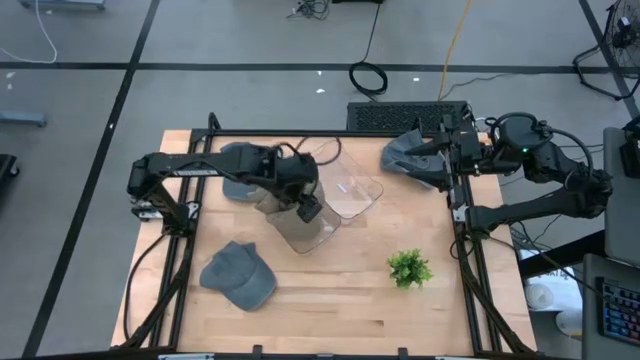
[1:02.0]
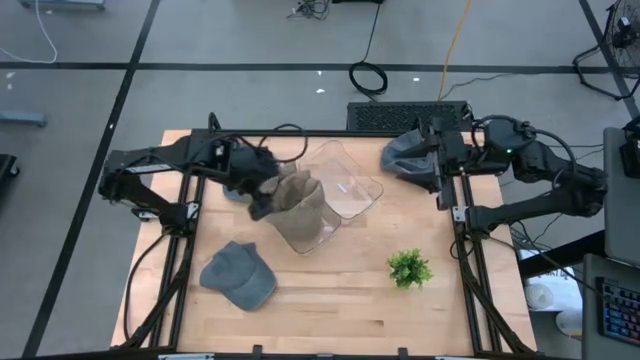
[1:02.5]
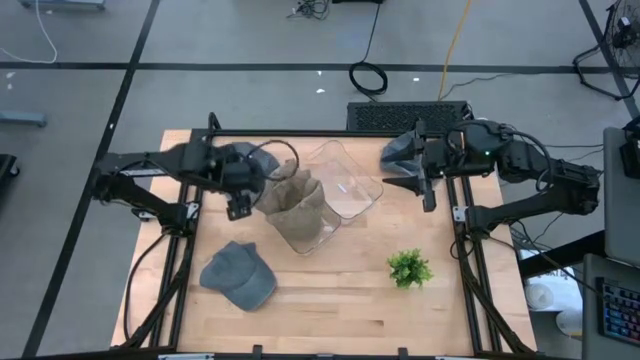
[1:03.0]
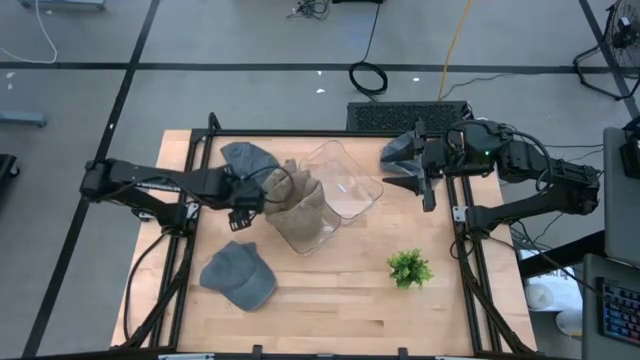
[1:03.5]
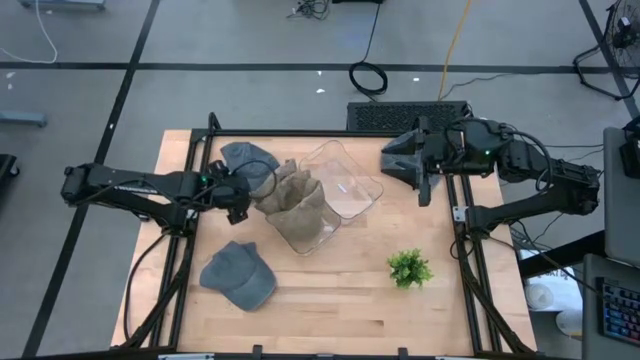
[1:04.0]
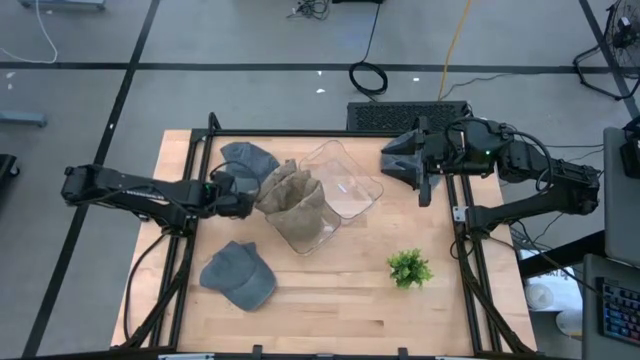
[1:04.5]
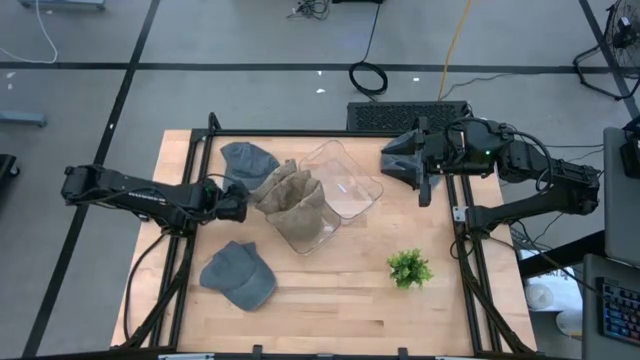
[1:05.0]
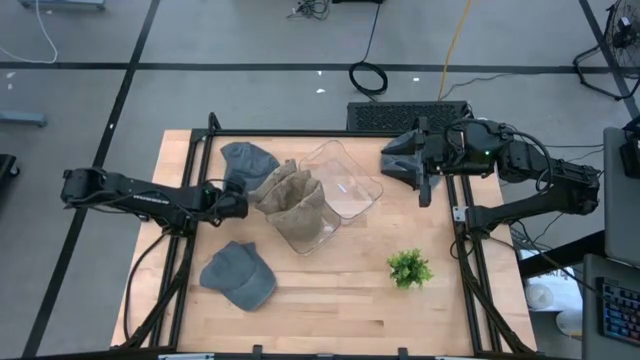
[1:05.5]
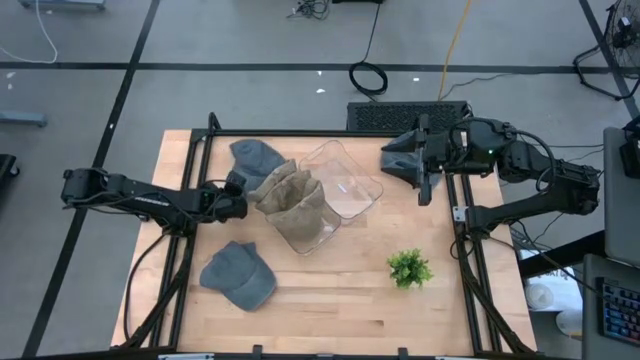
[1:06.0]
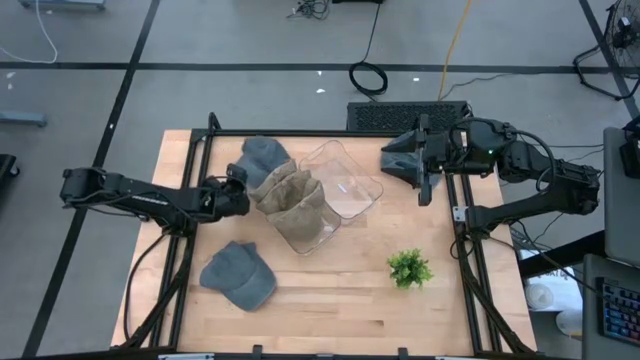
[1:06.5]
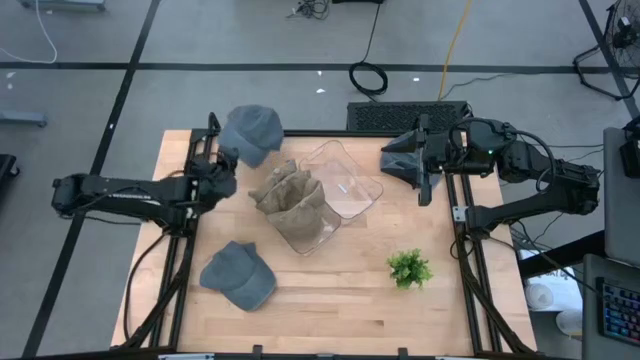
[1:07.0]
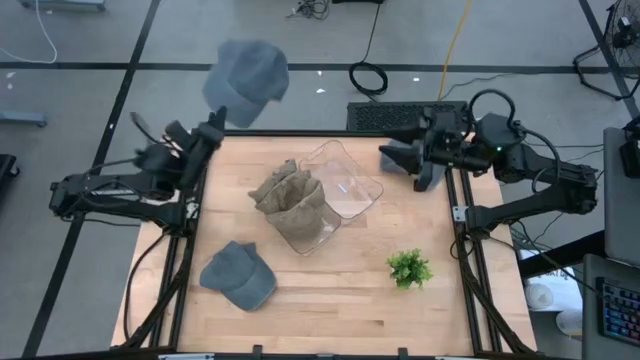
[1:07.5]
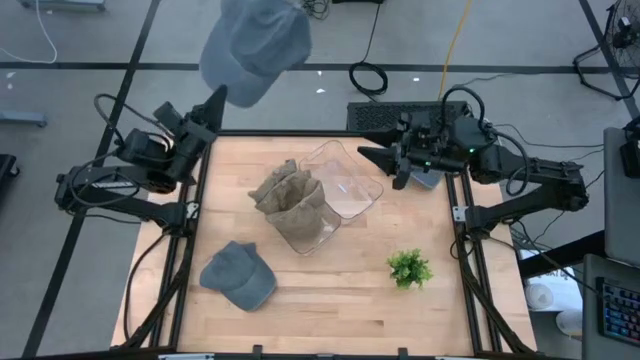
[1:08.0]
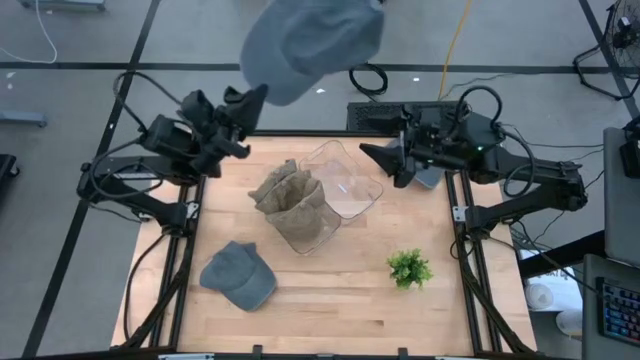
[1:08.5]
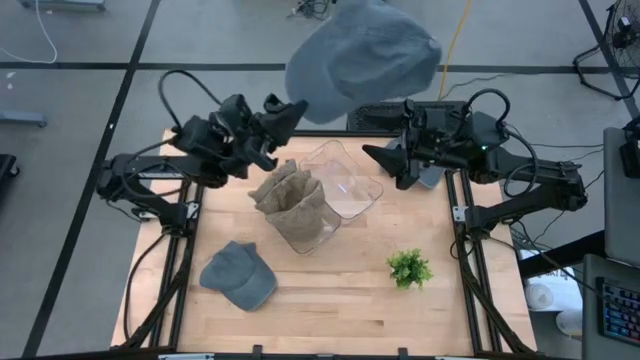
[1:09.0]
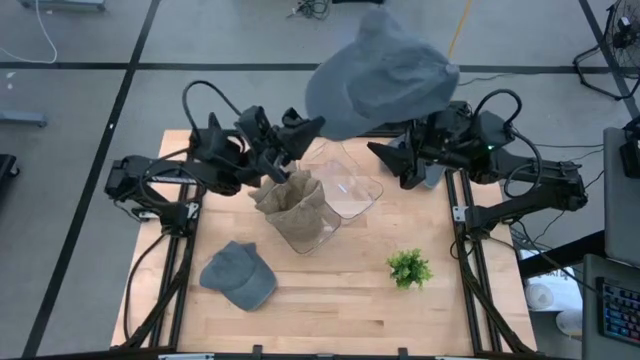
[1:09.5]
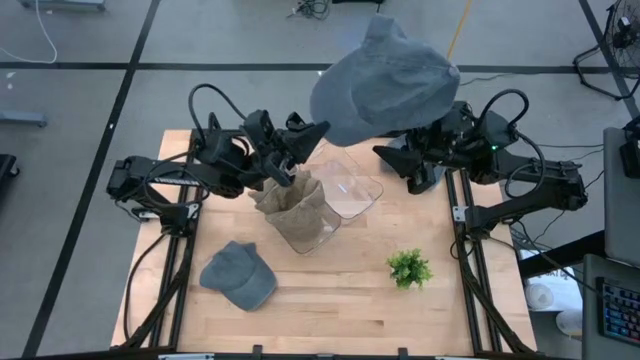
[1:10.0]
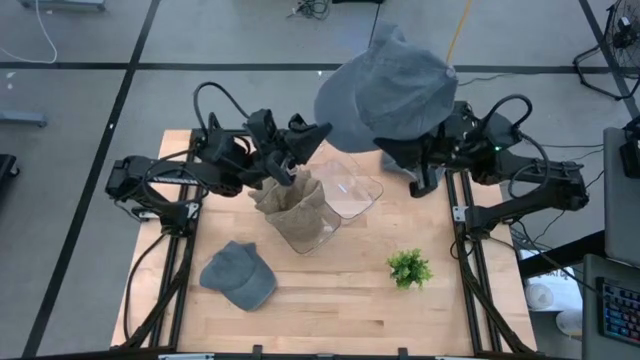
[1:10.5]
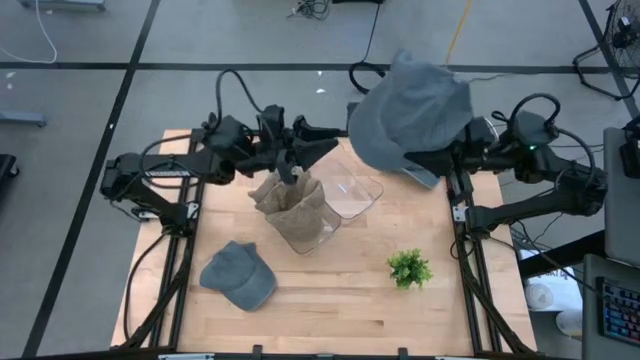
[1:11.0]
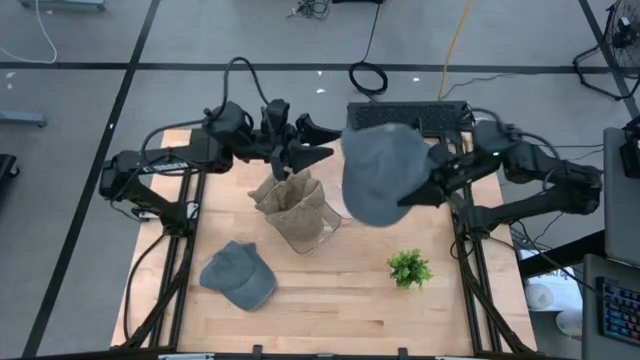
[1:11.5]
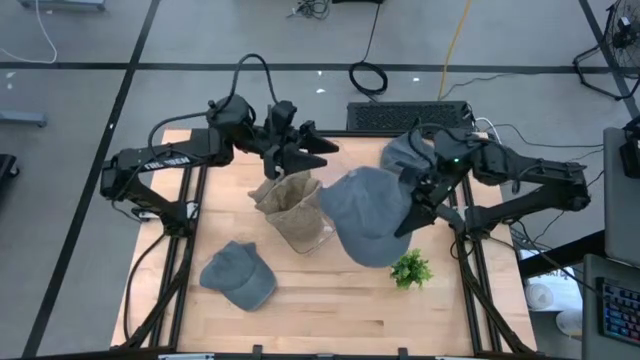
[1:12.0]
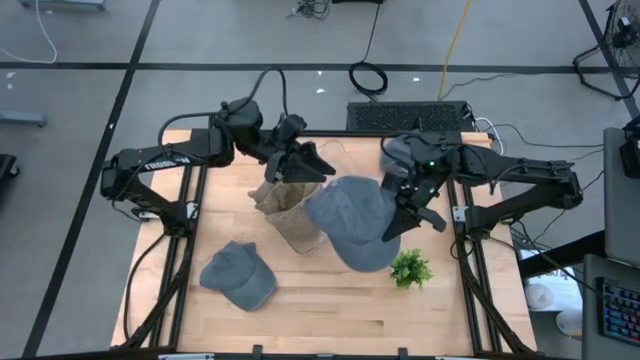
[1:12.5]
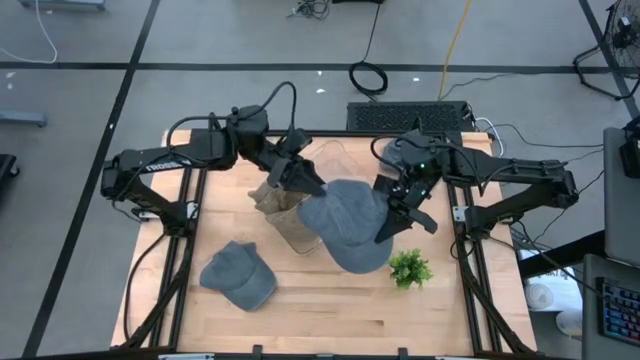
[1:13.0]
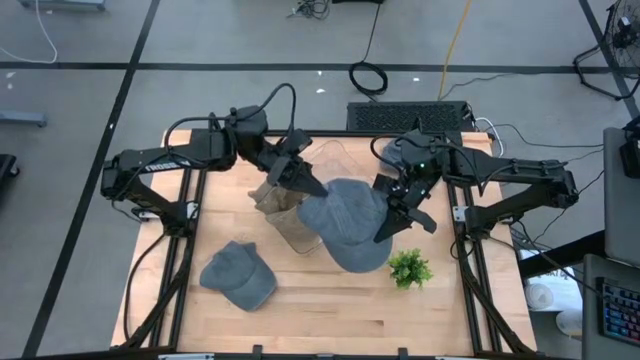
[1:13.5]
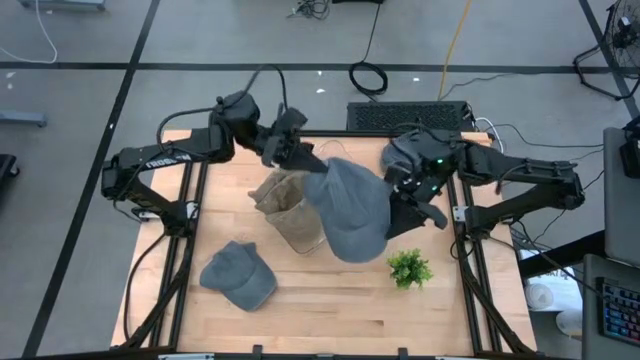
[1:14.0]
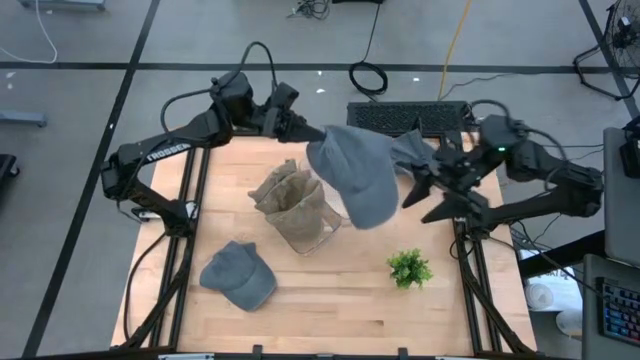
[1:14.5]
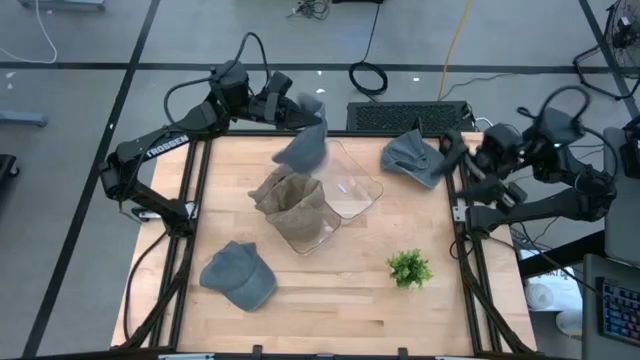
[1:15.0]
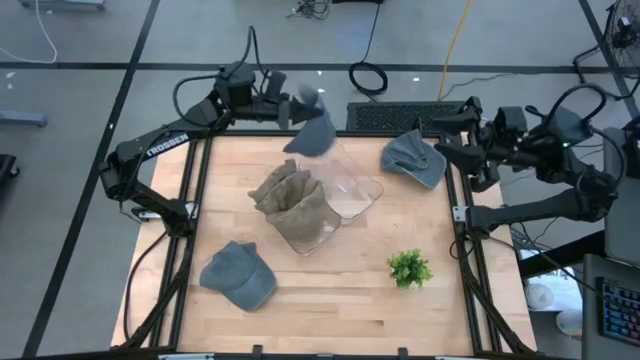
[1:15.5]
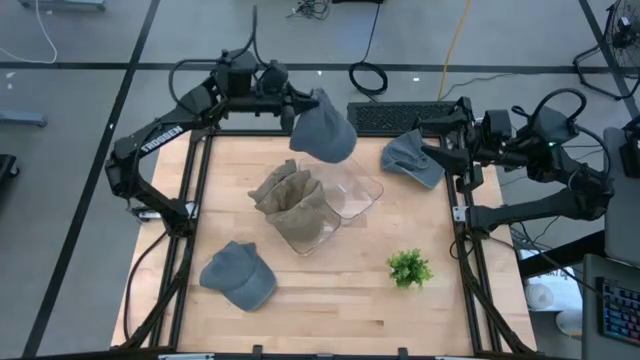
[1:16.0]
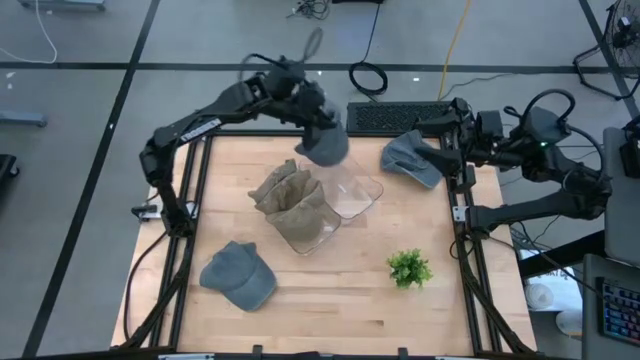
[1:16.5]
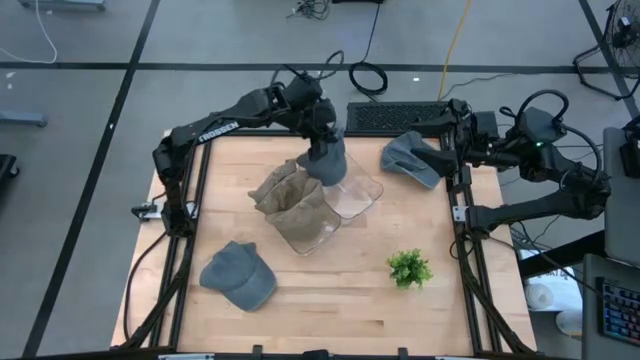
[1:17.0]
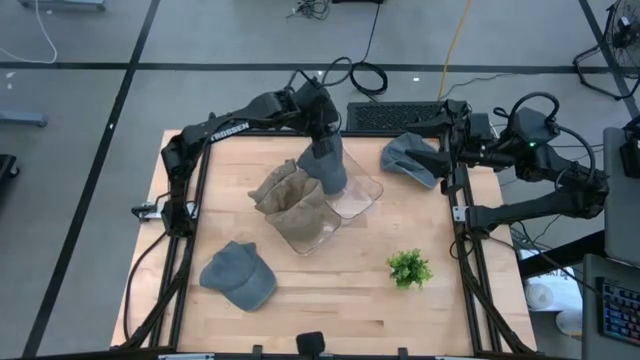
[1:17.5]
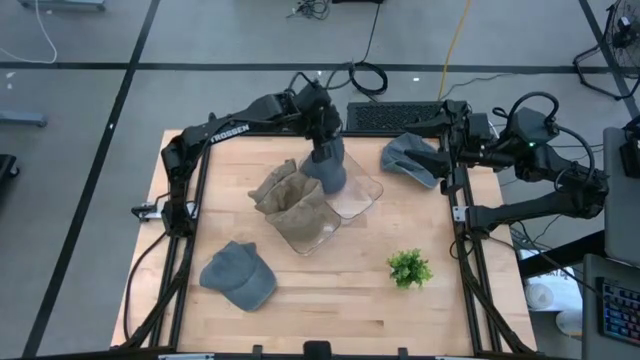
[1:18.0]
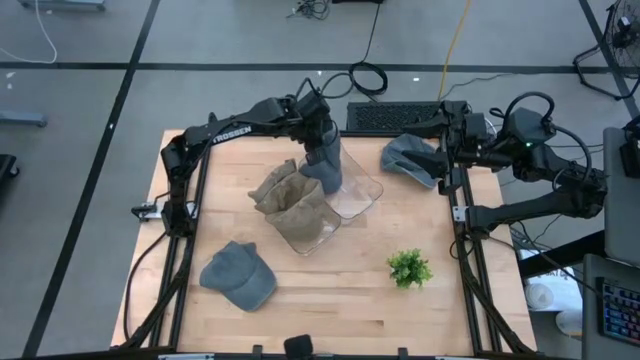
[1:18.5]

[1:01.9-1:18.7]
Task: Pick & Place hat
Put the top left blue cap into the right transparent bin

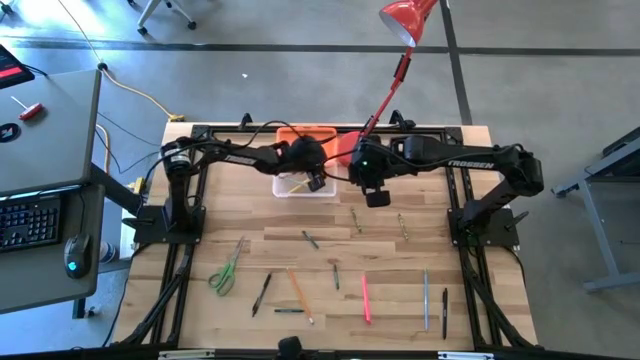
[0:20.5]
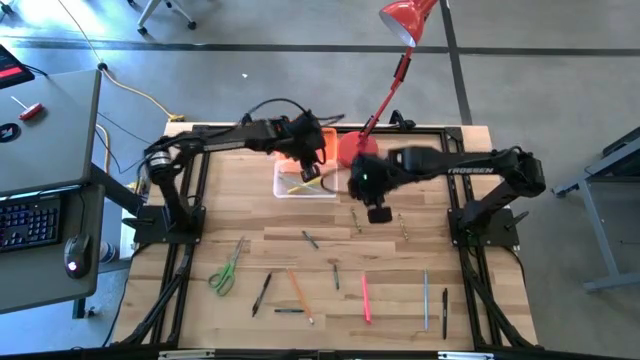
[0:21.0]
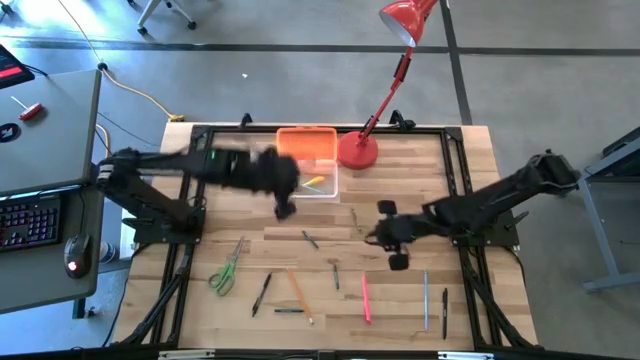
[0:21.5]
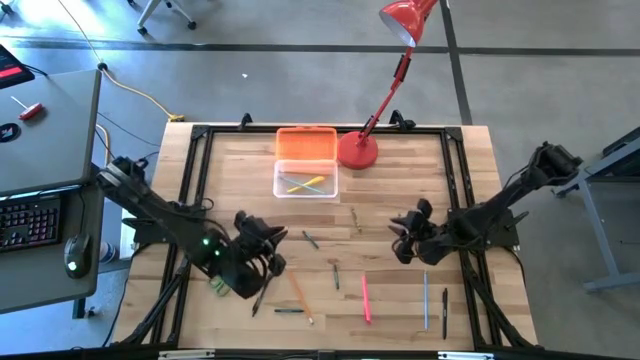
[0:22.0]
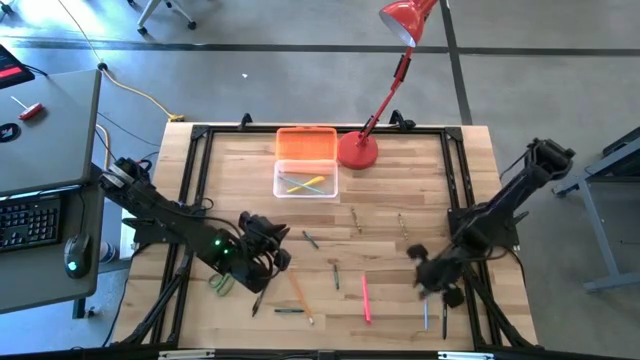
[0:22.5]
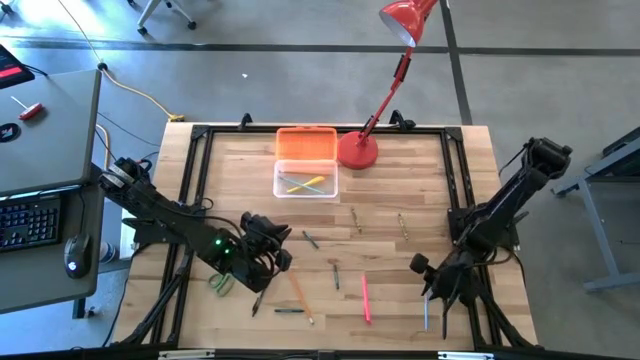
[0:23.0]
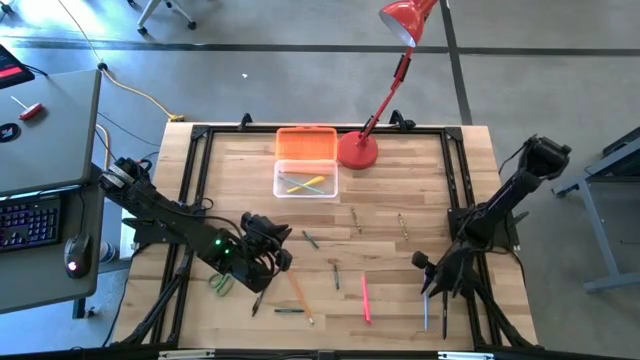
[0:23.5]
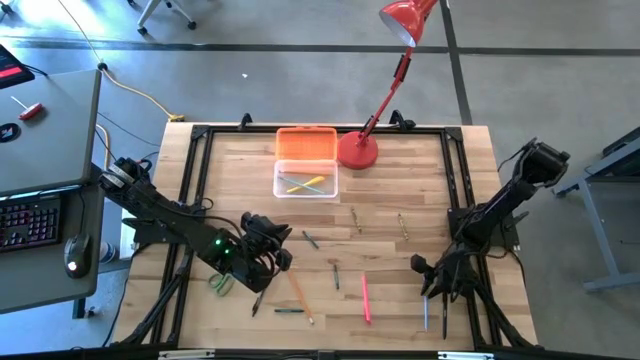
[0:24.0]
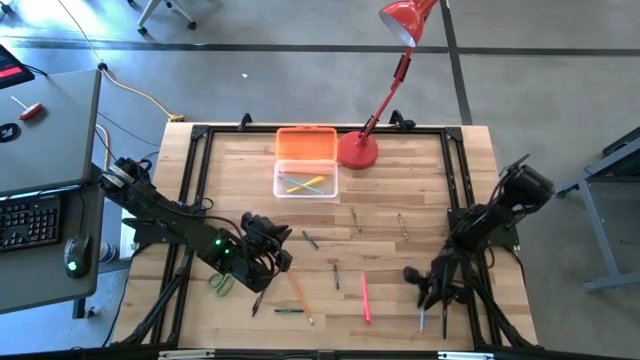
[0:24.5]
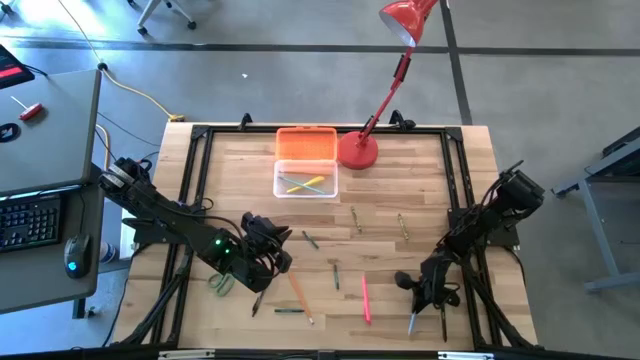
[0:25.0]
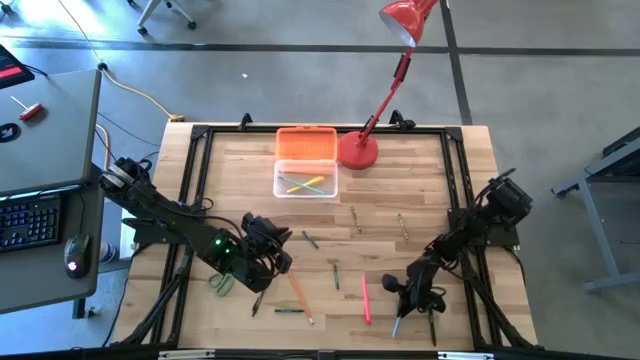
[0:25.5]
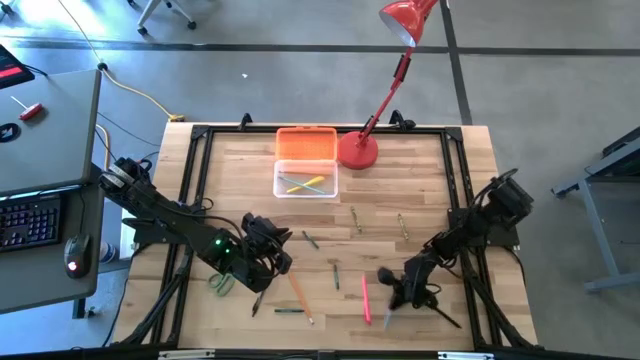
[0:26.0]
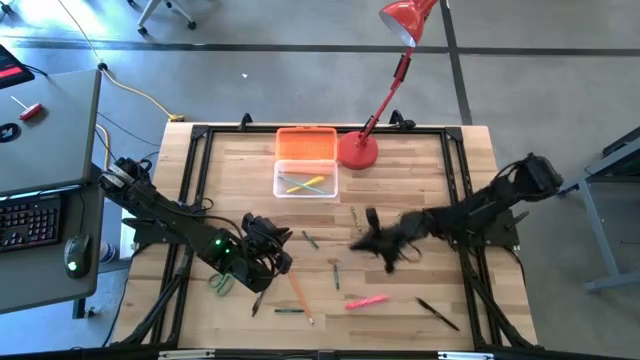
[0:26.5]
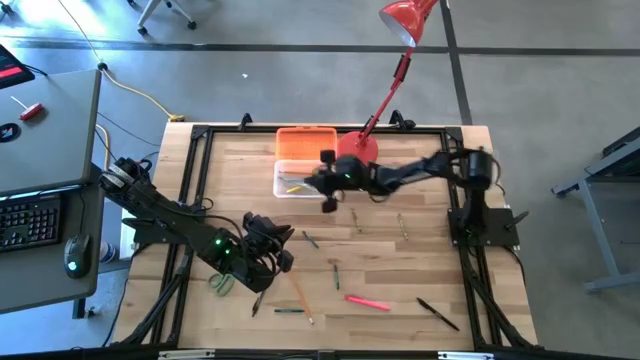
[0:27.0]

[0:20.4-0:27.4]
Task: Pick & place school supplies into a supply box
Put the blue pencil into the orange supply box
